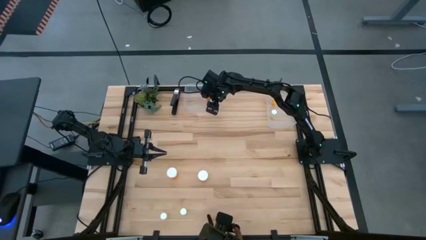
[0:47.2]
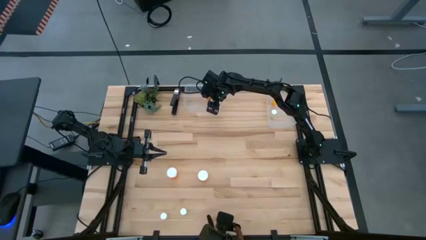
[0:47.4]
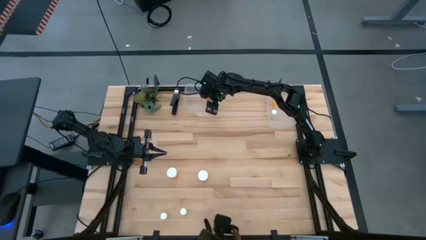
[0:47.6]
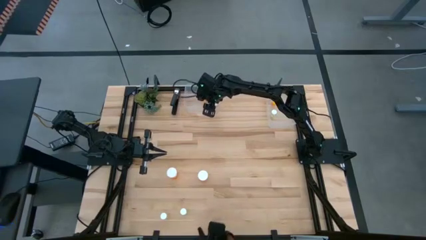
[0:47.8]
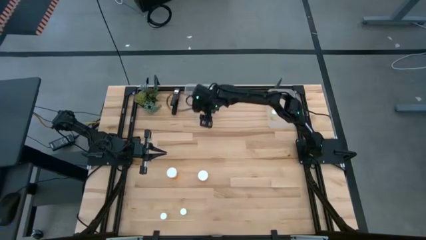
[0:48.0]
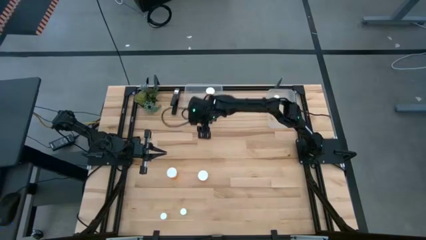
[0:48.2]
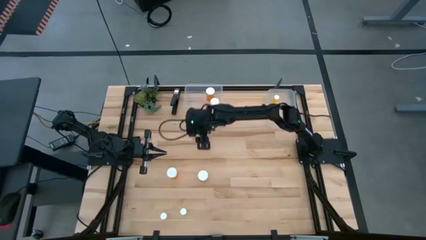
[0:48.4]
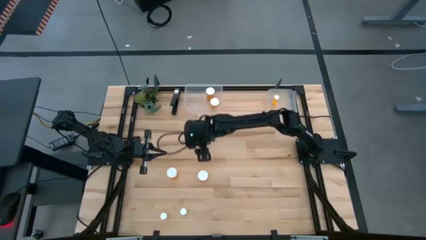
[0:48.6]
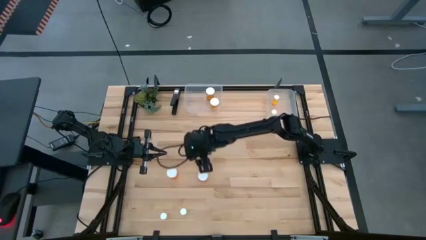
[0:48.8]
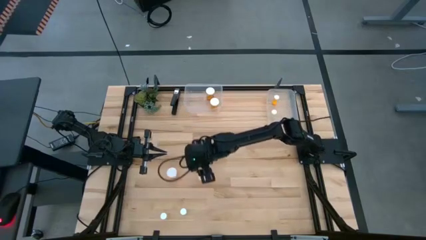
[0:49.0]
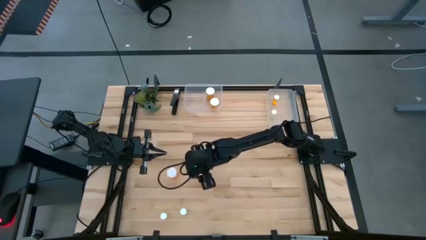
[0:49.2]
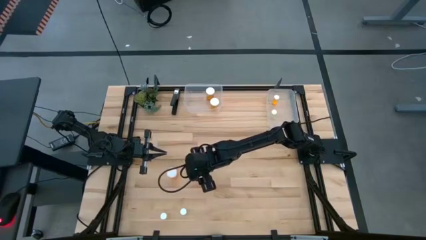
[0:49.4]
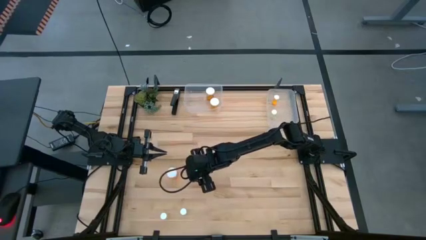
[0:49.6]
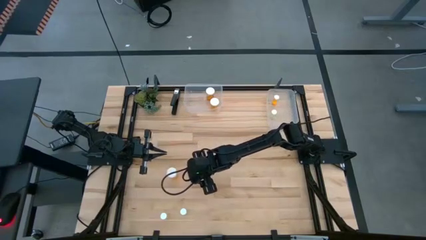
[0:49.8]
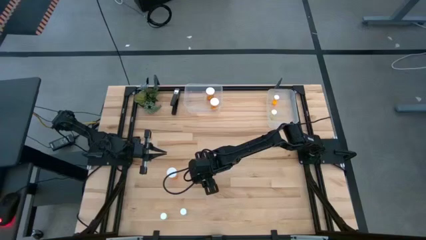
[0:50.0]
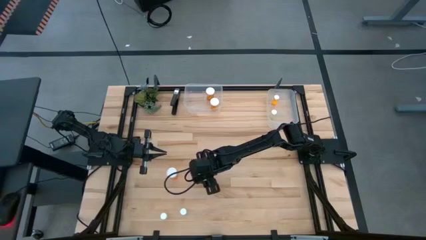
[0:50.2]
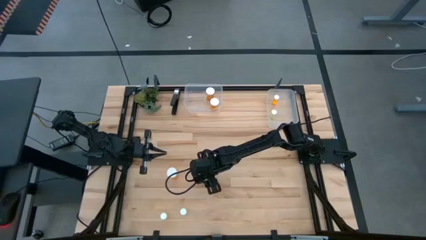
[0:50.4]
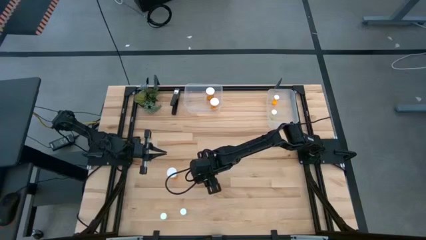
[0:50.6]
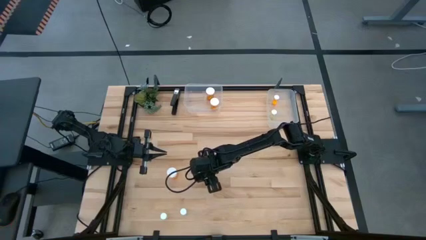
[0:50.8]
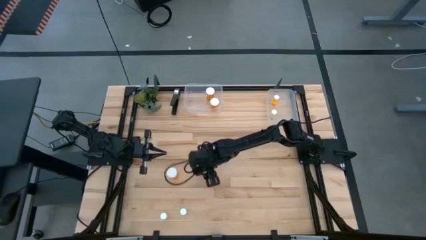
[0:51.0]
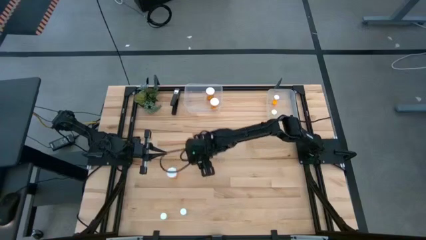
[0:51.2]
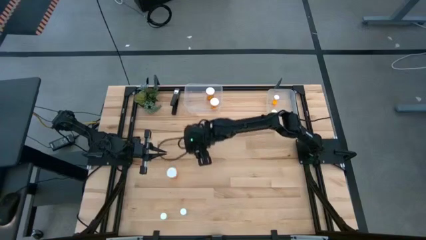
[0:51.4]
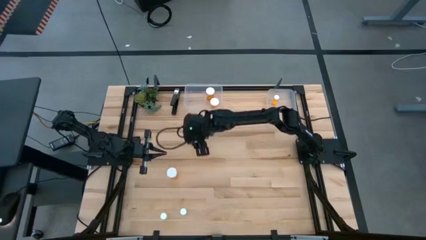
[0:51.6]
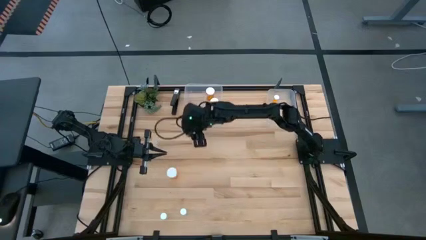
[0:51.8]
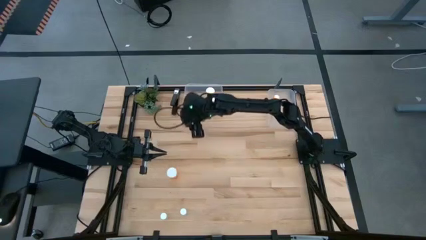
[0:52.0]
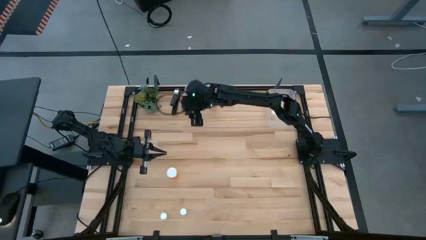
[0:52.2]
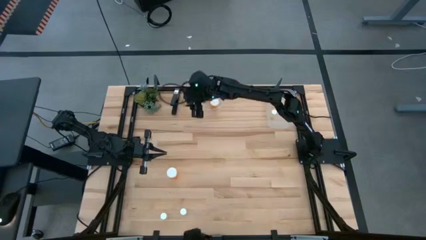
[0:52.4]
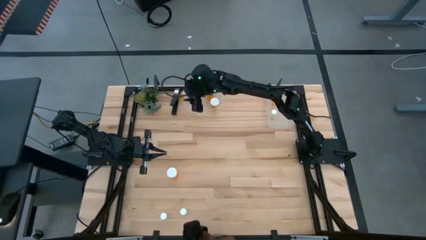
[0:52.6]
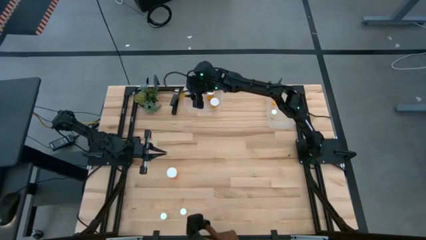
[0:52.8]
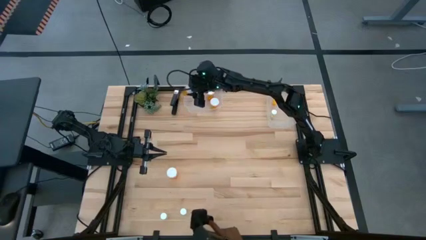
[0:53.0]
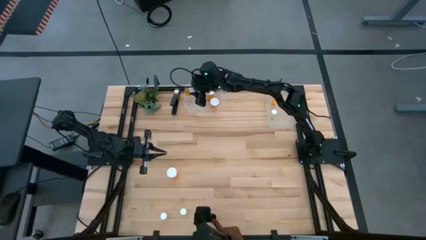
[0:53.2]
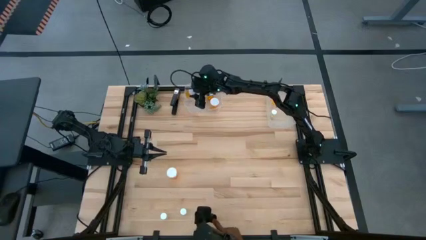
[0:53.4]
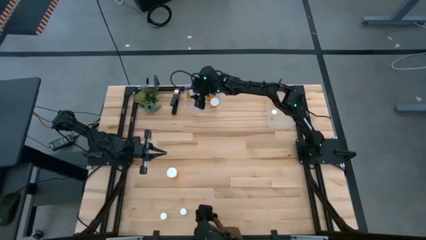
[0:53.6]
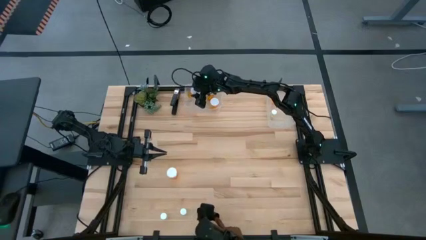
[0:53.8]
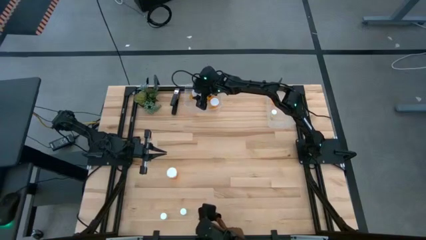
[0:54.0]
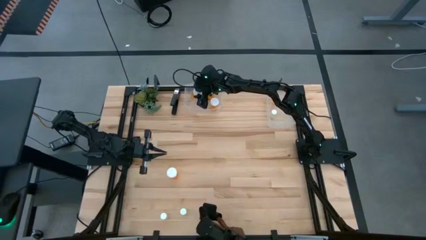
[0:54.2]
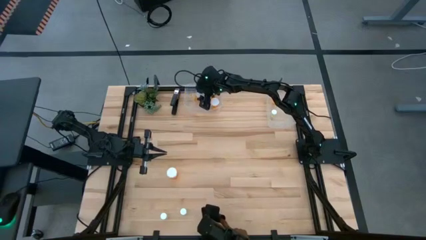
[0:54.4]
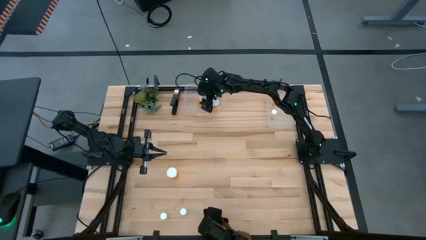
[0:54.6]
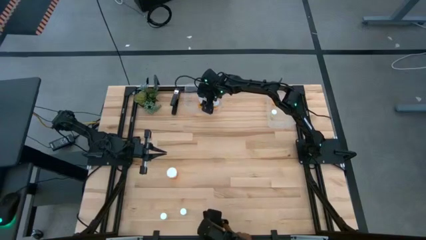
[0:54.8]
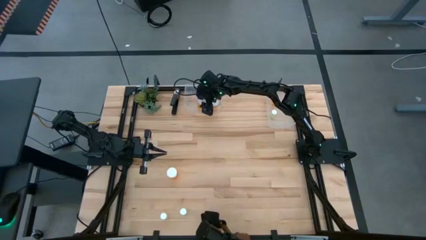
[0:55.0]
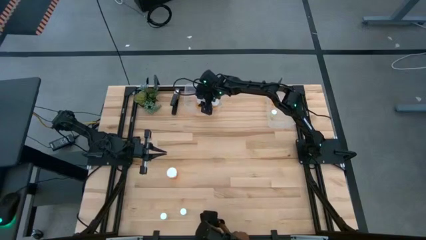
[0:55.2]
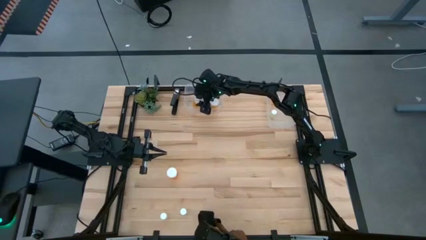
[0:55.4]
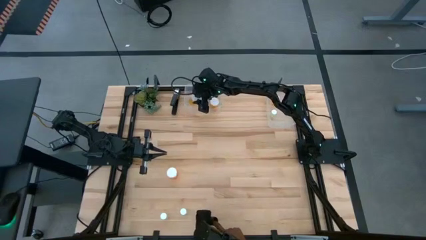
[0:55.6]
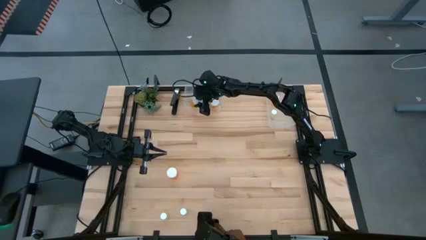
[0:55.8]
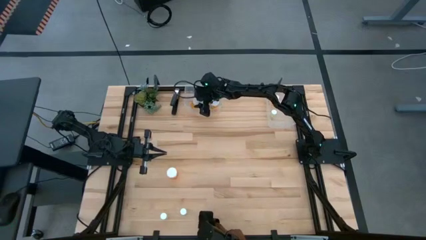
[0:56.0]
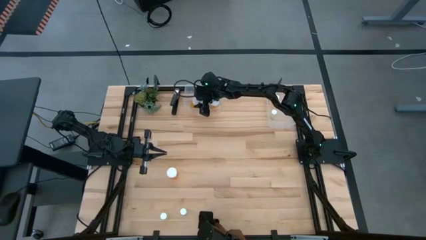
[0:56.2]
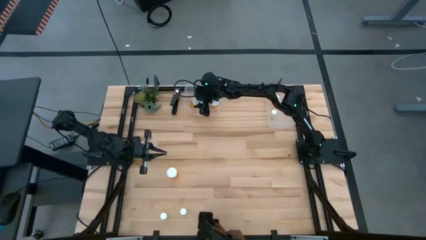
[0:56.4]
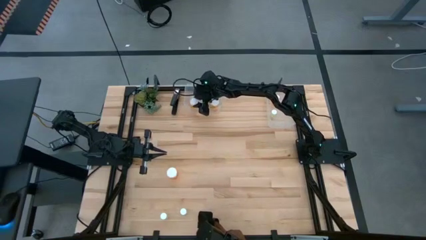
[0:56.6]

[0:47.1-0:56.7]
Task: Pick and place medicine bottles into bin by pill shape (circle, oval)
Put the right big orange pill bottle into the left transparent bin

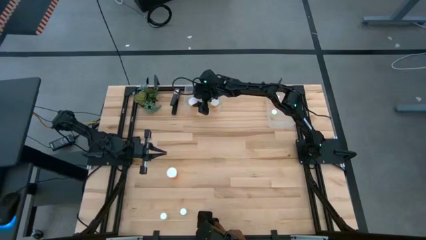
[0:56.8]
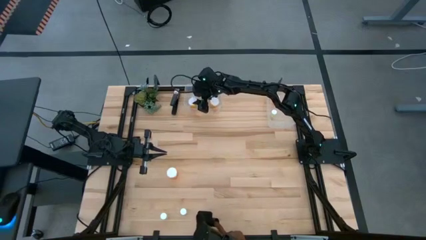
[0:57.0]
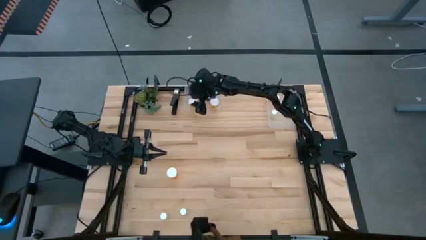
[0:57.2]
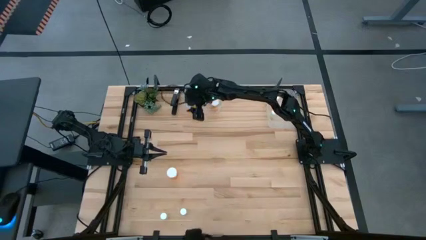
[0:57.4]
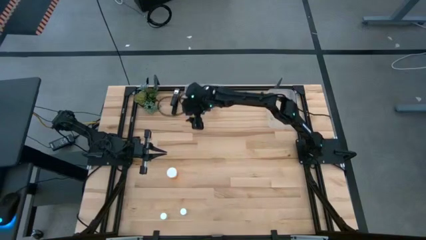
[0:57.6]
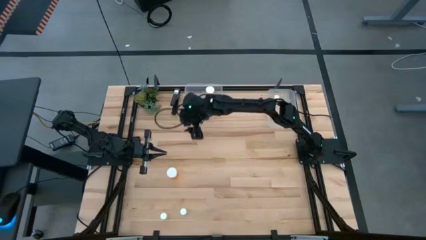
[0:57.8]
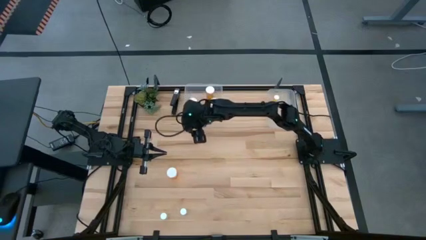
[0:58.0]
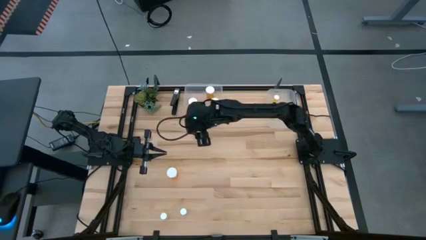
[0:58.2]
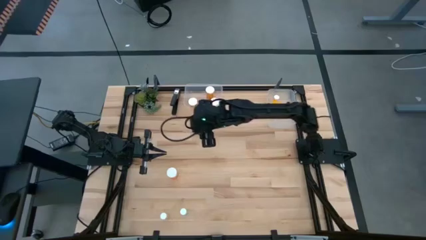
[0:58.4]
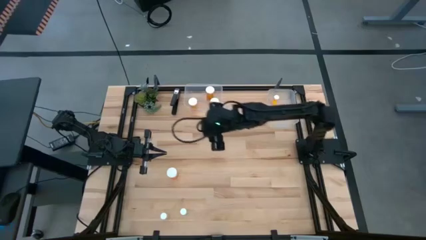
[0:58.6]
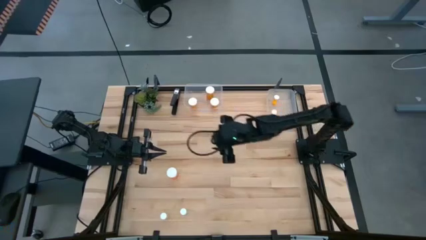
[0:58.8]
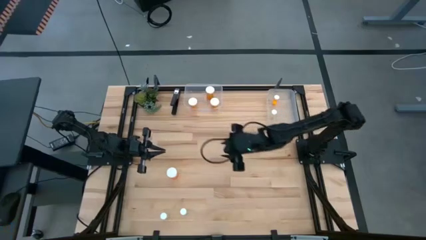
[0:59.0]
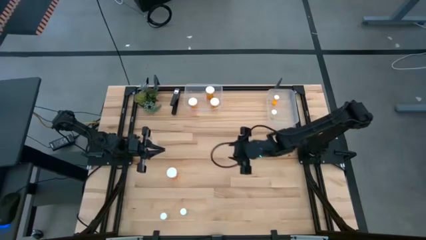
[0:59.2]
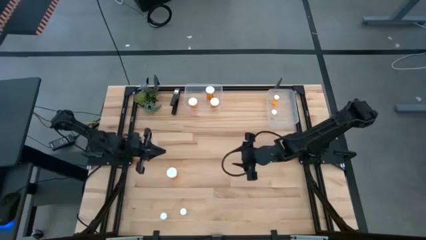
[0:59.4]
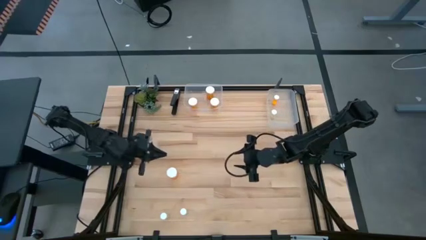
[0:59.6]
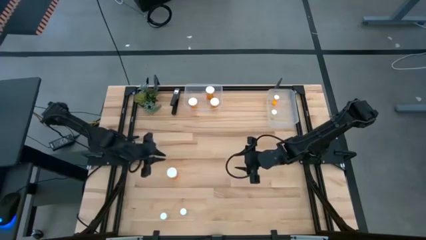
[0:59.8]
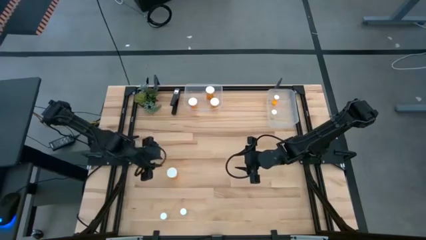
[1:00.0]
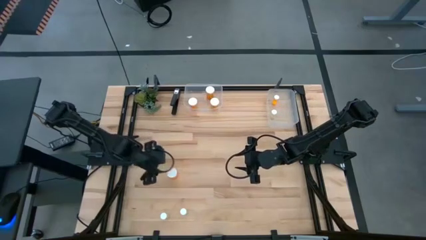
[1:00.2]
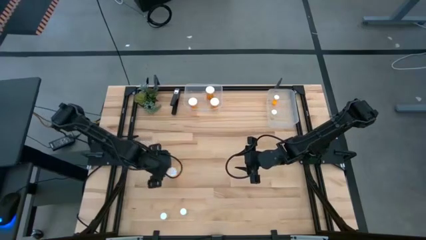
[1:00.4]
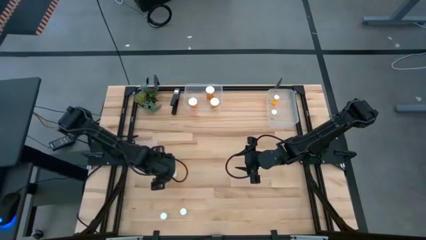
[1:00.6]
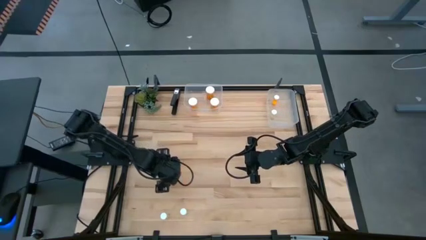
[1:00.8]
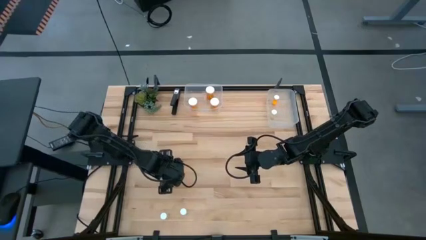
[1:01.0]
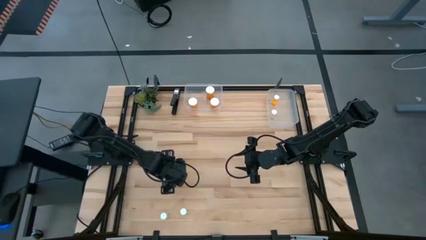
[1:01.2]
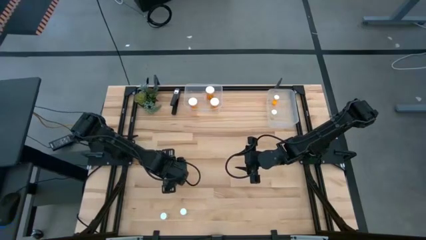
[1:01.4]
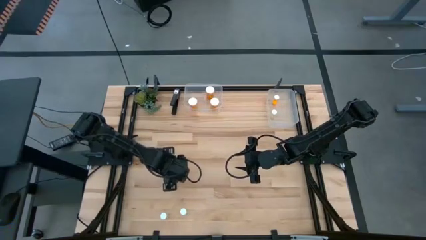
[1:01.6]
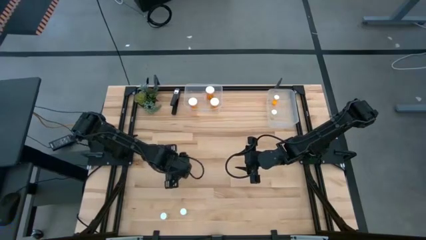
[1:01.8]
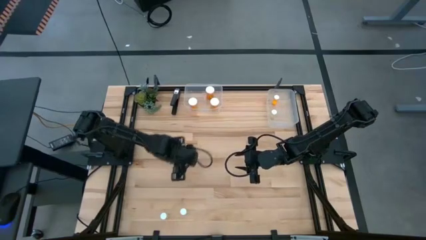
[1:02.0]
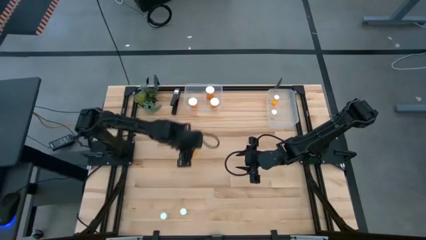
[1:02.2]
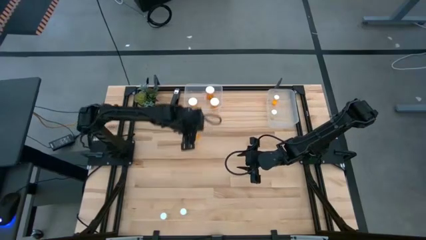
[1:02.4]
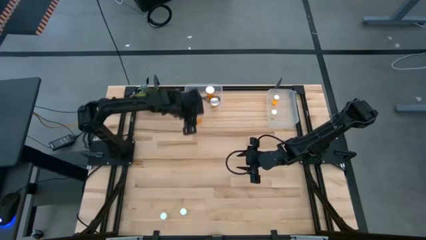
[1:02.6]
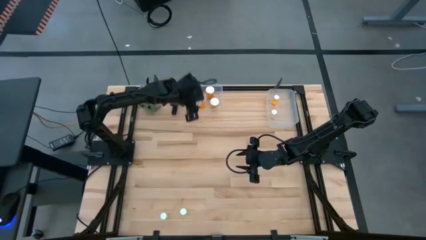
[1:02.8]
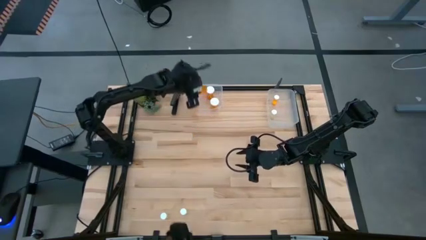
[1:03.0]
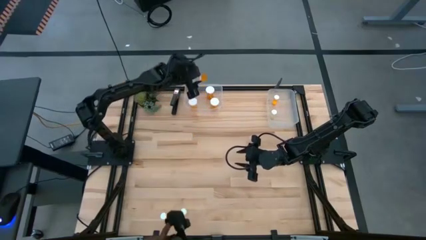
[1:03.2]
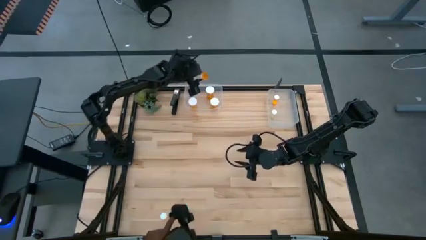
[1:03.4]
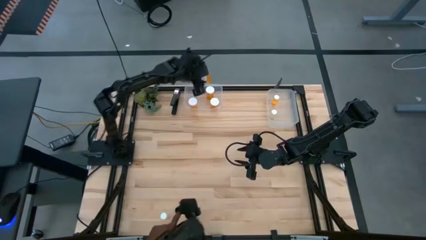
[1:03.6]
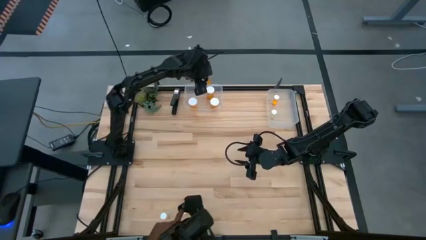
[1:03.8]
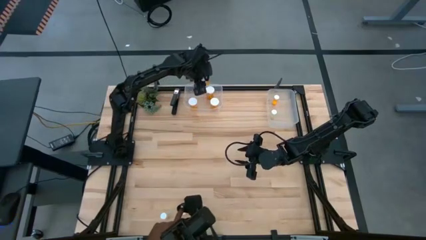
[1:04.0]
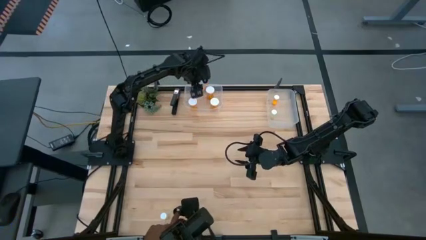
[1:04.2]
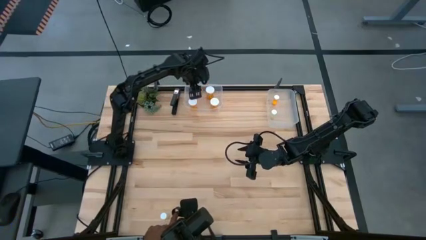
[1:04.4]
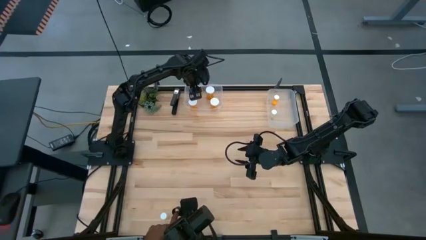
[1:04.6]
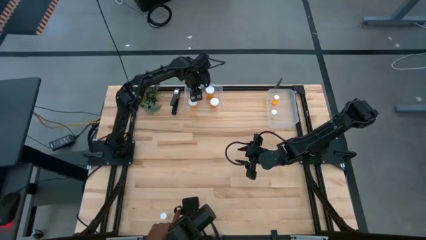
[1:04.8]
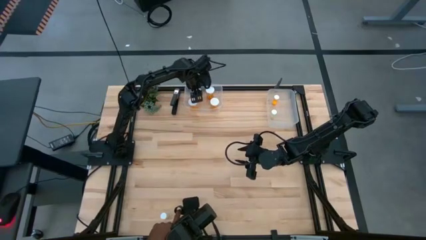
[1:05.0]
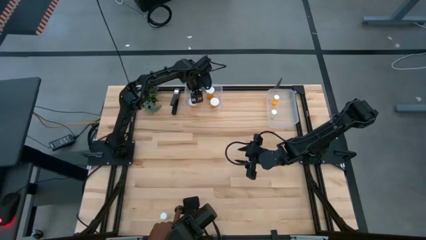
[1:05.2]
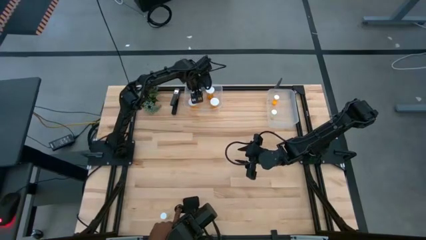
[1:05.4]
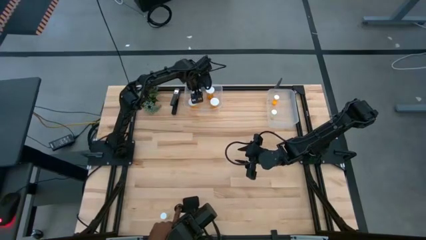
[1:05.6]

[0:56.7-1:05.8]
Put the big orange pill bottle into the left transparent bin
